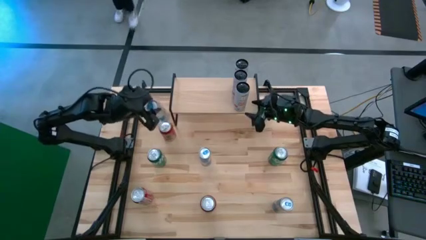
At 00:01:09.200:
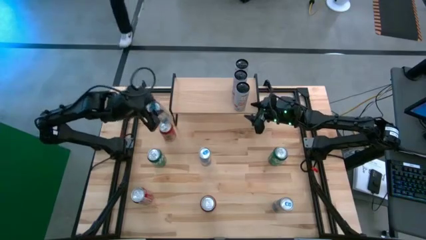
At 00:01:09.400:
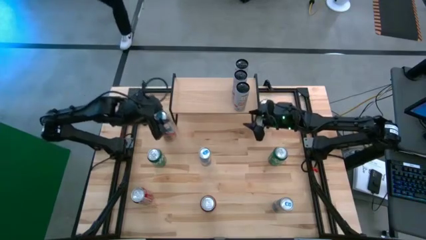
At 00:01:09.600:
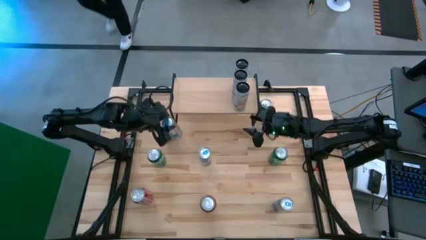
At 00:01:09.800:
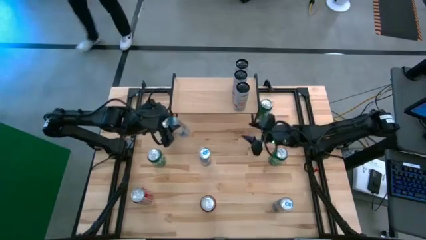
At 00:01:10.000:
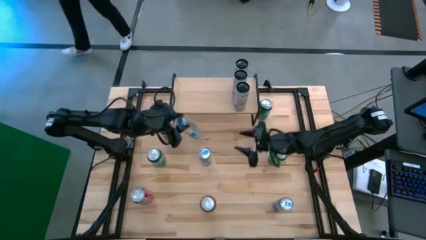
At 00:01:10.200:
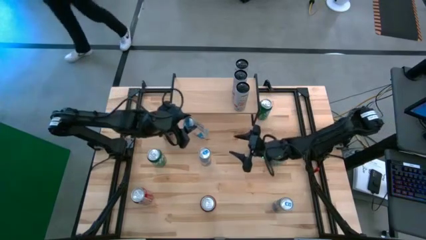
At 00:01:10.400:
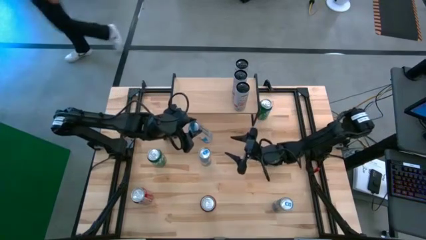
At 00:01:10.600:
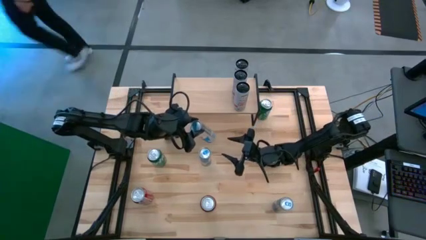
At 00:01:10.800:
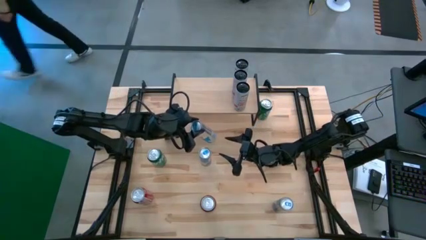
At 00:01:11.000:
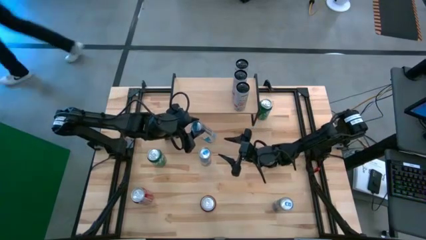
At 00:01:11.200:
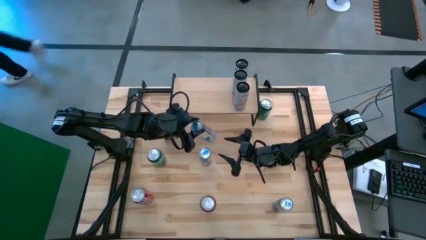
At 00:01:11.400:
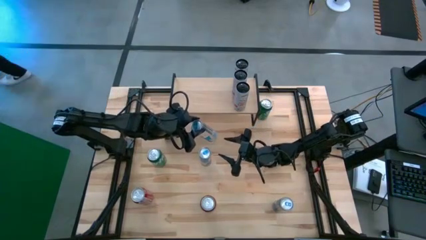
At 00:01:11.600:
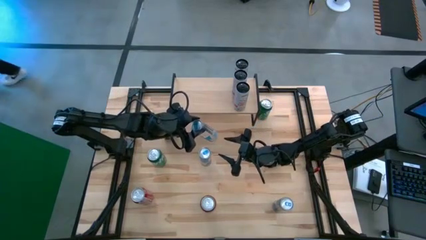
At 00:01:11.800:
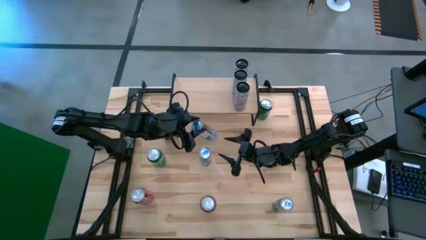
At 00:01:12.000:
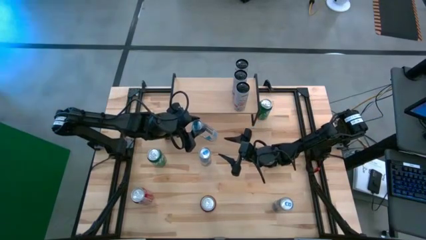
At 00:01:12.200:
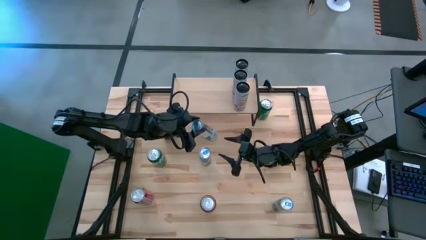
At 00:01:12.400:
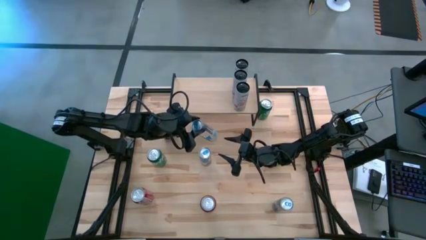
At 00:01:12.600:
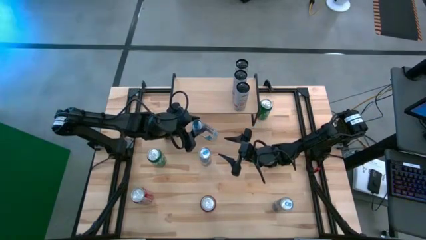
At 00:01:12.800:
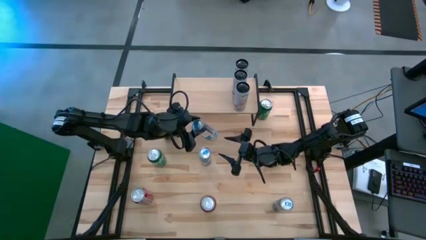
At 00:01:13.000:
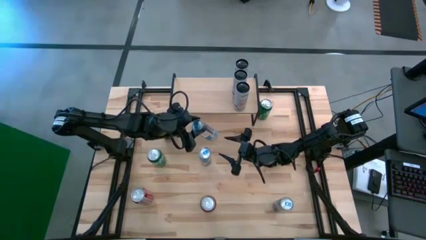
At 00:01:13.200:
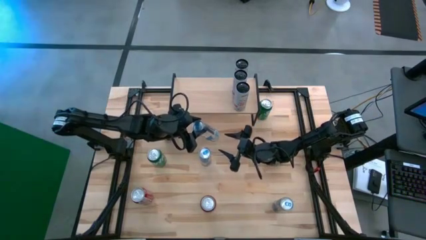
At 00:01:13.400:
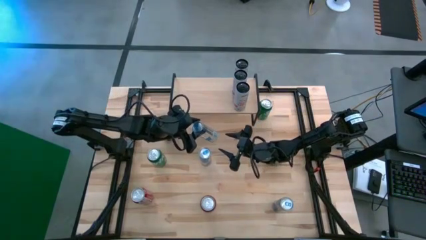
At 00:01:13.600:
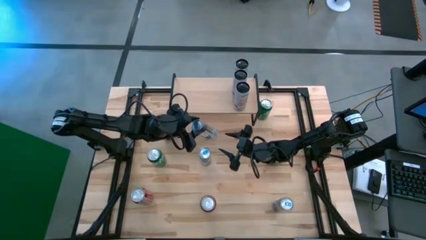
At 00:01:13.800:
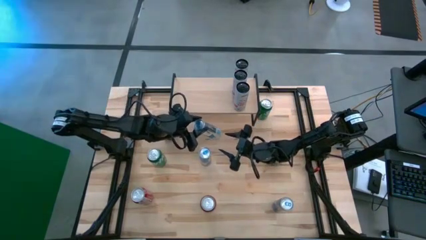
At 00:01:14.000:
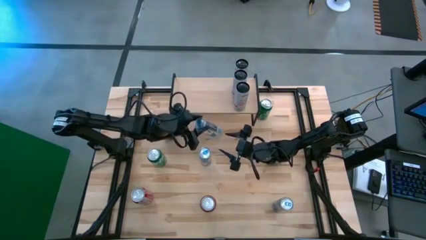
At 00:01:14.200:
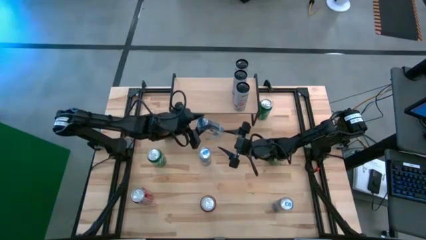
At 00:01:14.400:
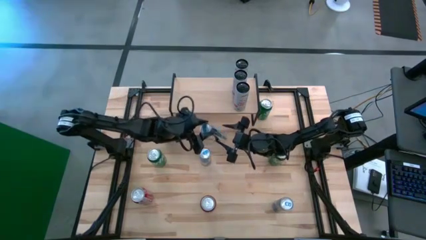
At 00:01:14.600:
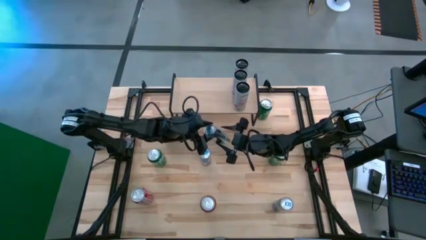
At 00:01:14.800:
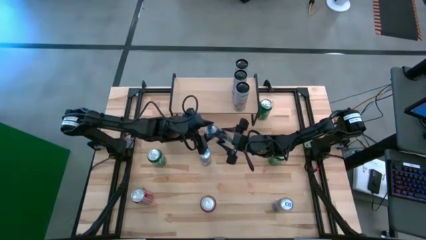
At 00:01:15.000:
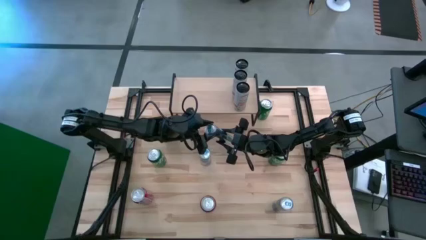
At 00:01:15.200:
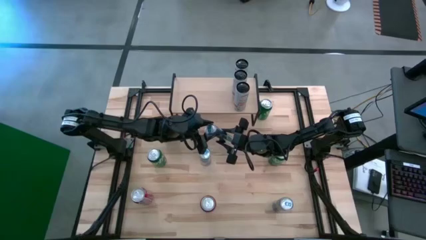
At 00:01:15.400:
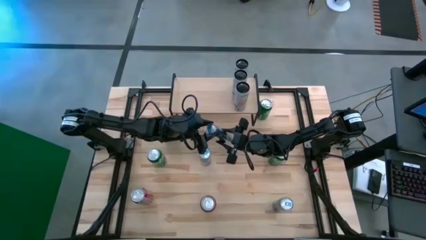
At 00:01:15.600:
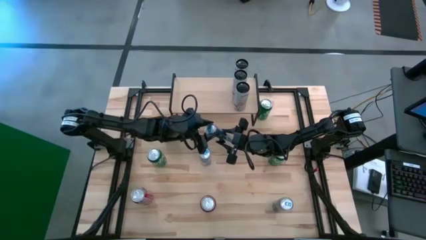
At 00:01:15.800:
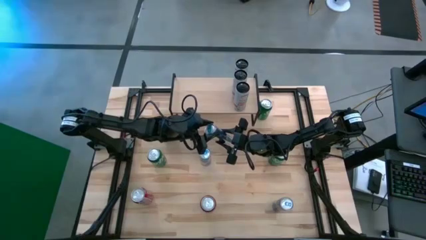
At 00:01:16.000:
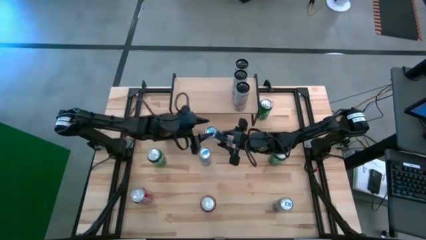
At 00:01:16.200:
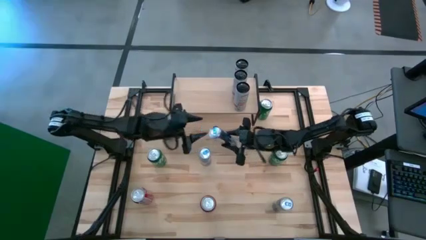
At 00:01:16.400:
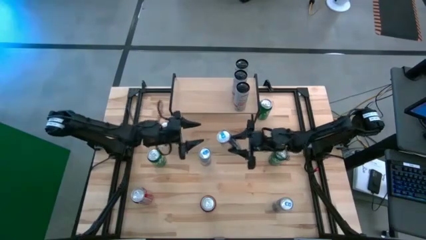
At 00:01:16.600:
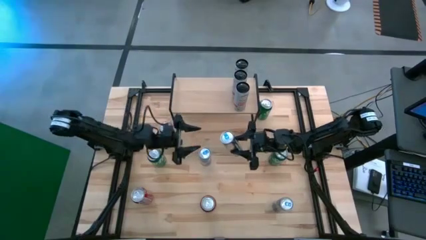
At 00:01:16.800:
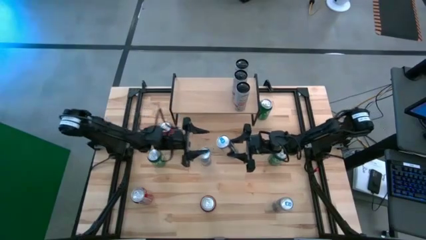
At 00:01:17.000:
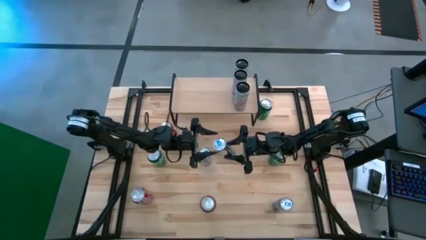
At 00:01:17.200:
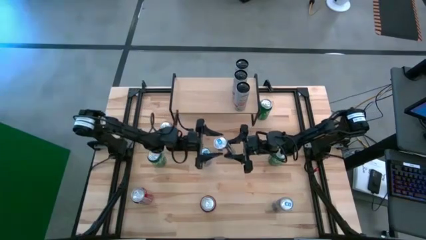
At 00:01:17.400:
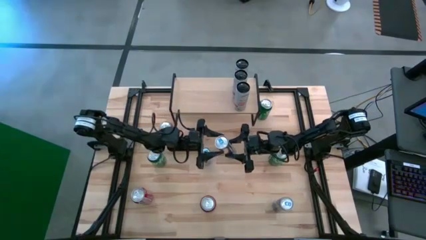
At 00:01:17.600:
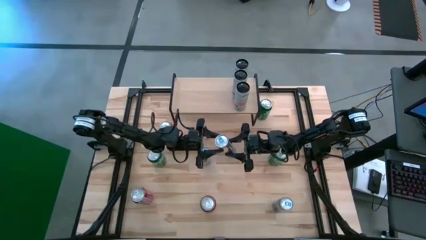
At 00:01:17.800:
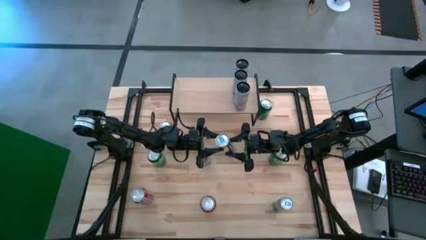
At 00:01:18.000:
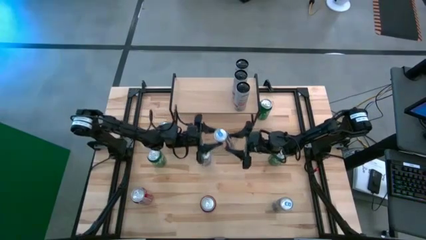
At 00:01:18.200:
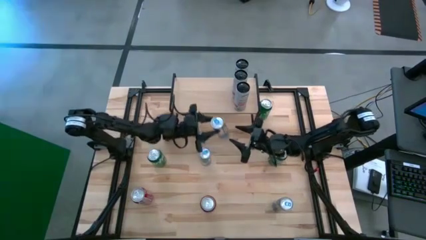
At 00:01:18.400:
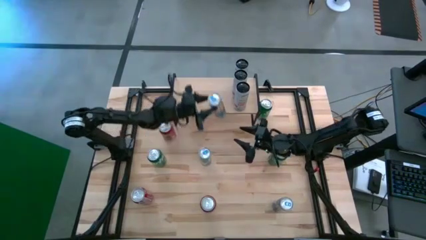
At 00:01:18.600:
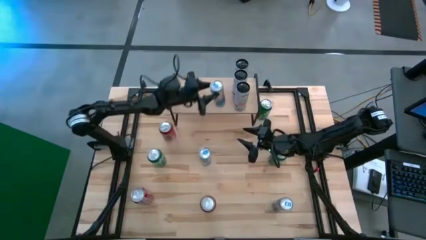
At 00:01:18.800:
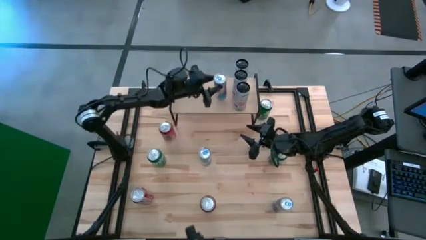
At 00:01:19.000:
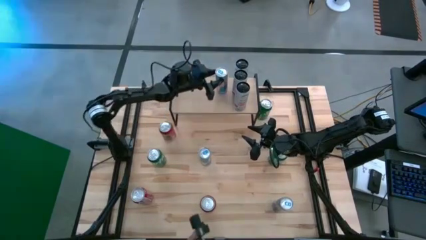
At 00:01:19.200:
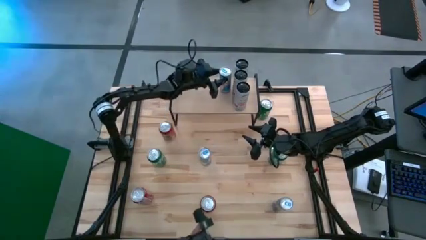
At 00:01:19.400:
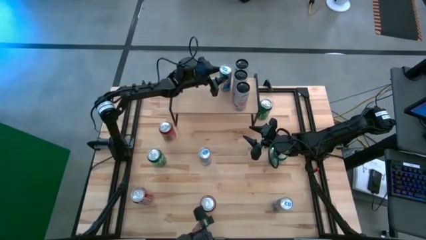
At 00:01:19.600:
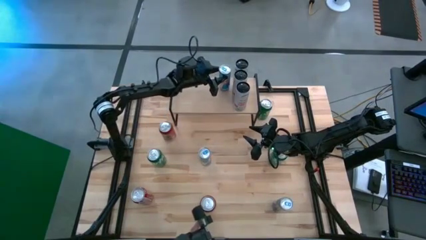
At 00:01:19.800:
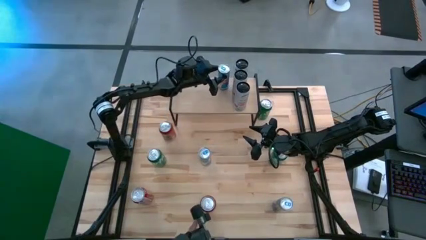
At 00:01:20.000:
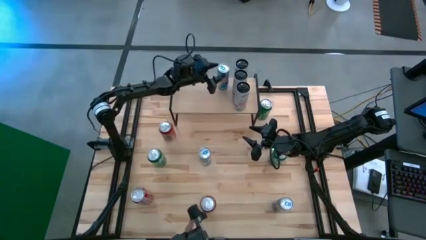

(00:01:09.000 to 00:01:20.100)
Task: Place canned beverage on shelf
Put the top blue soda can on the shelf
